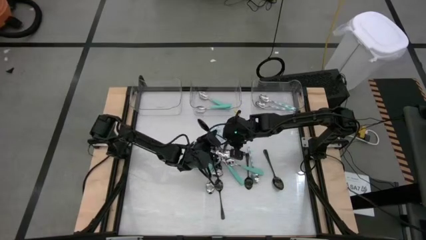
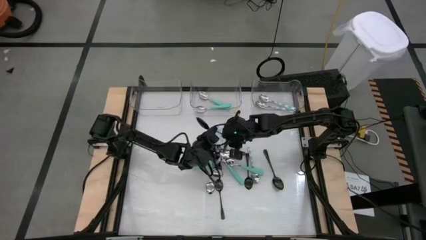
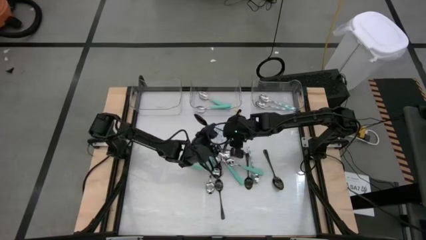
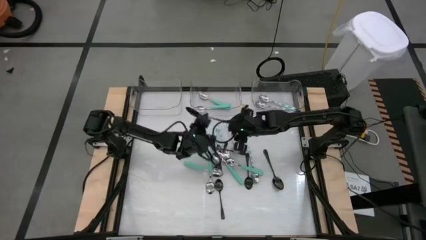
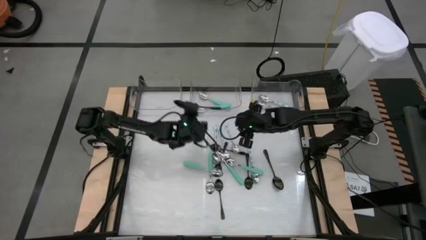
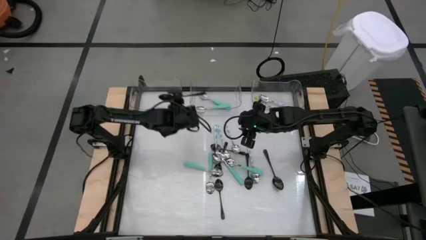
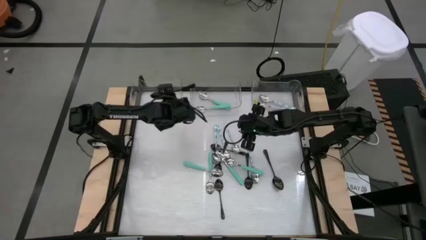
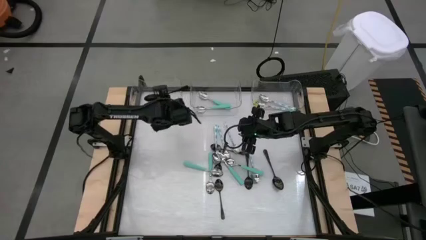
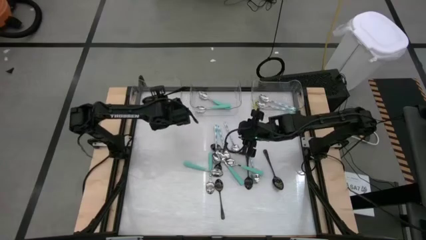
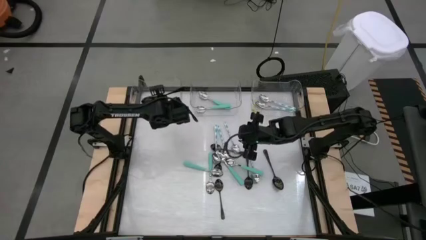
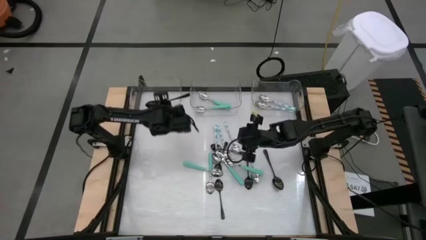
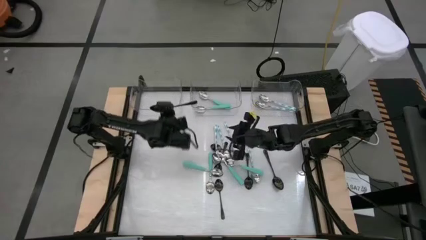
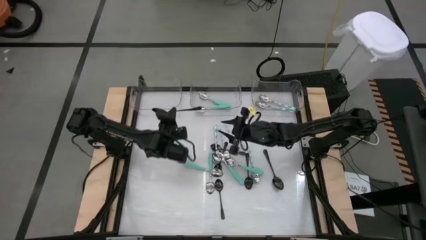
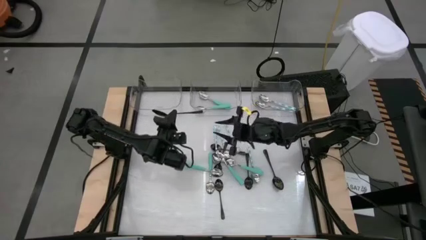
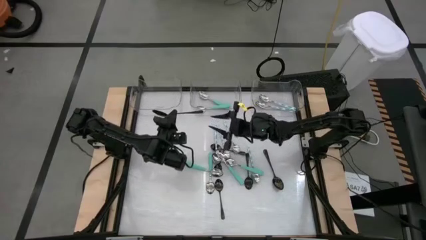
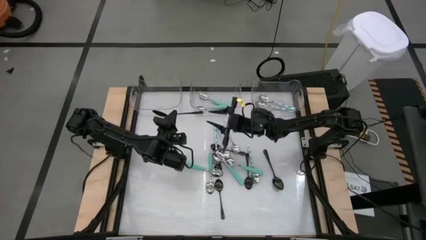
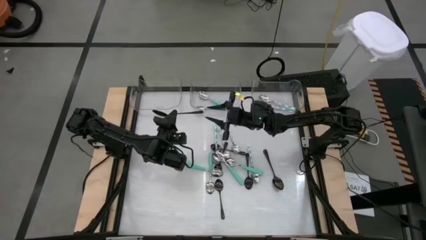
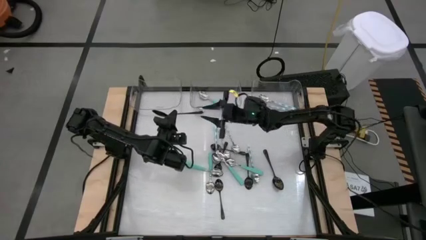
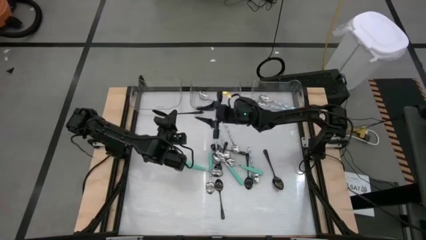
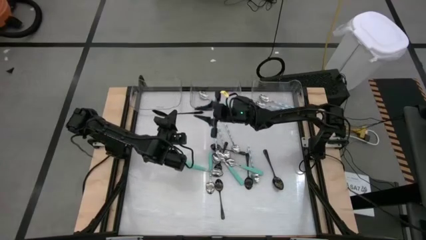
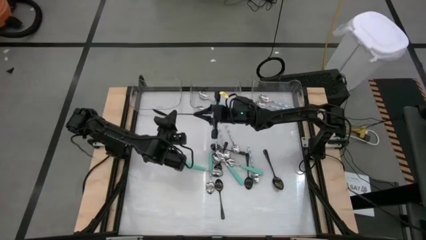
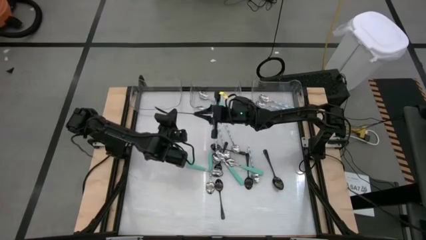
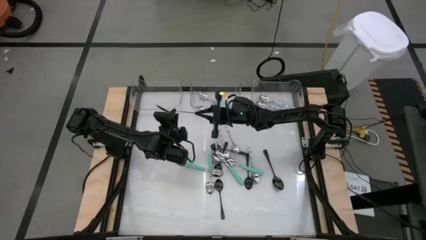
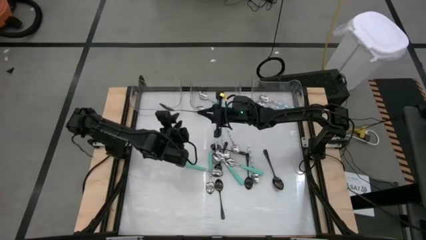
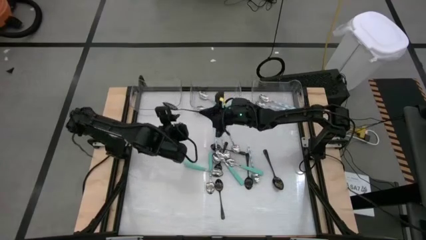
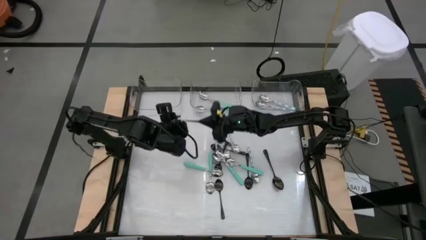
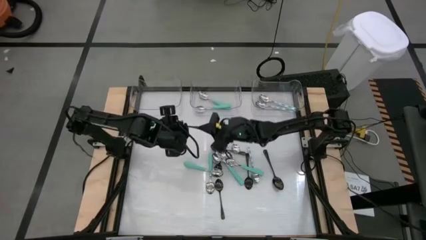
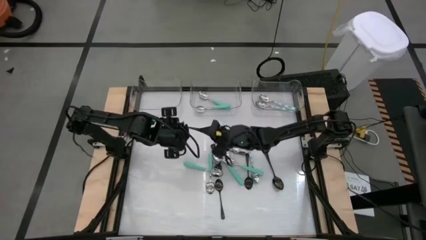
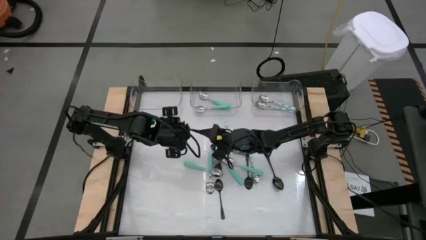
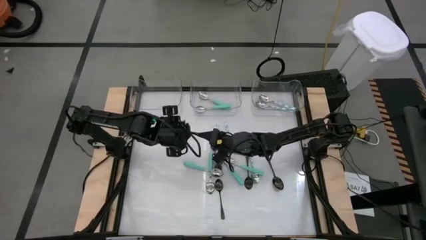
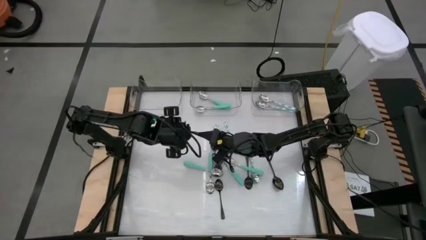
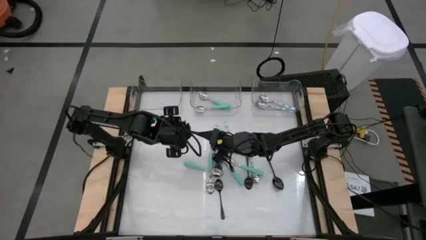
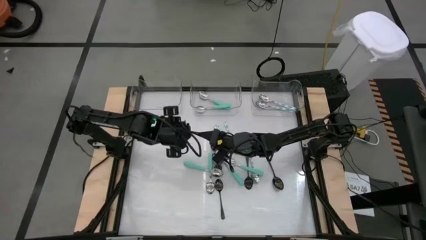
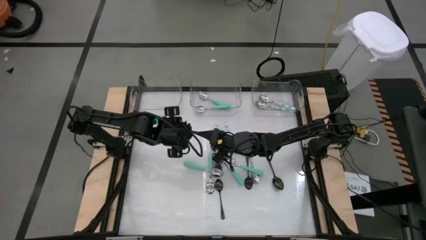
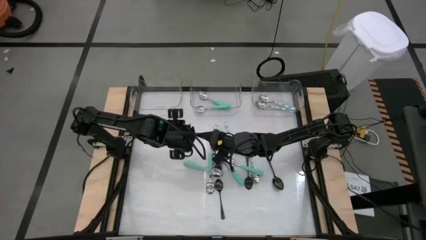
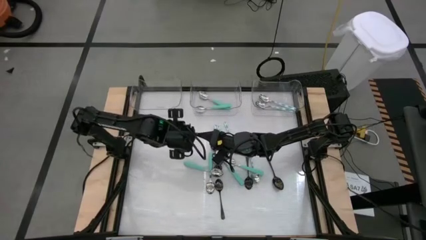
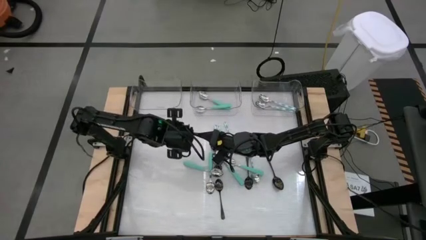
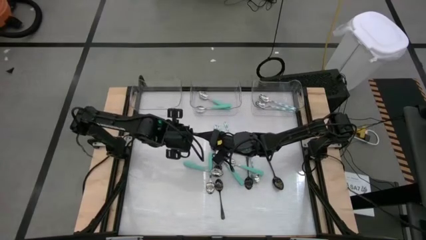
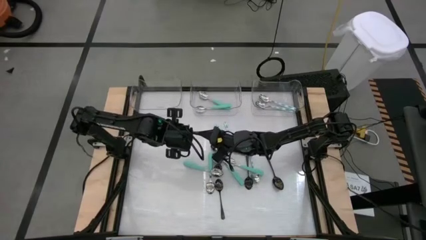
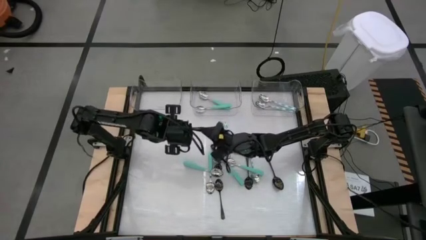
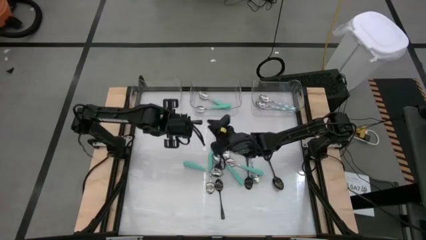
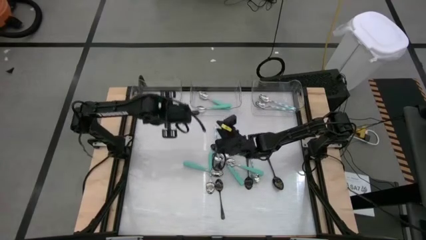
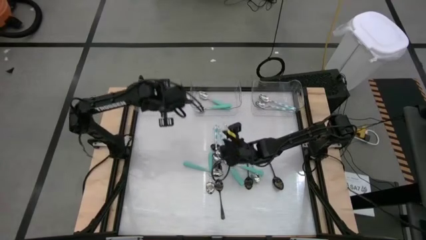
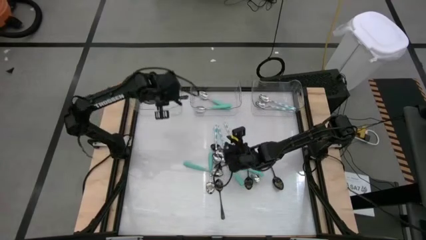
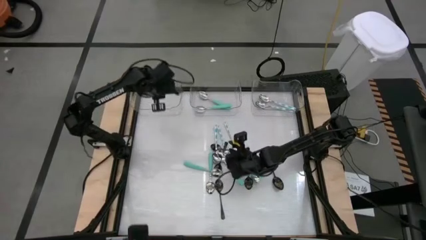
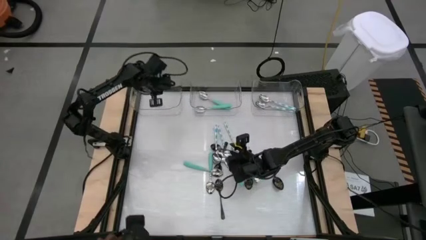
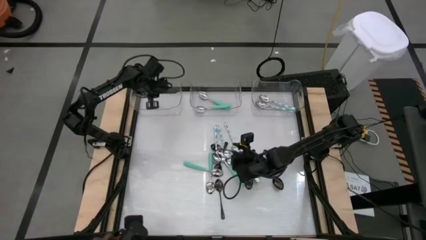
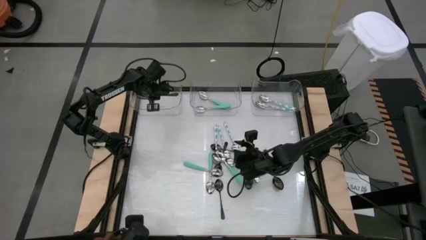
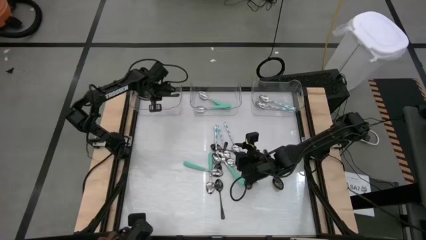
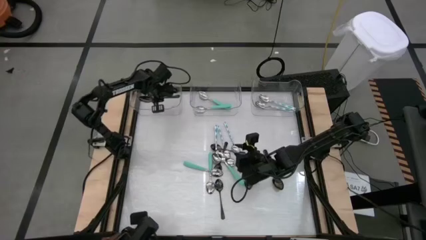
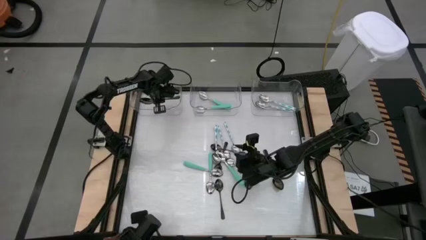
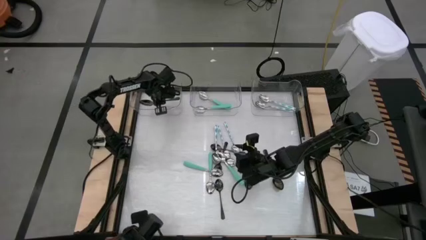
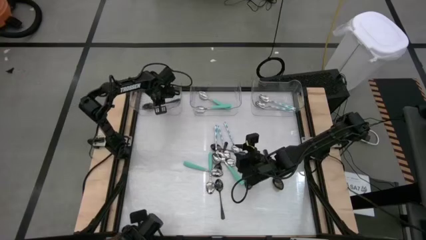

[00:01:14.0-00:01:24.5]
Task: Sort silverware by color (type)
Put the black spoon into the left transparent bin
